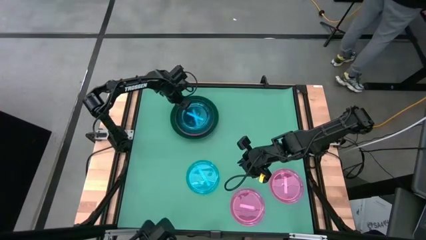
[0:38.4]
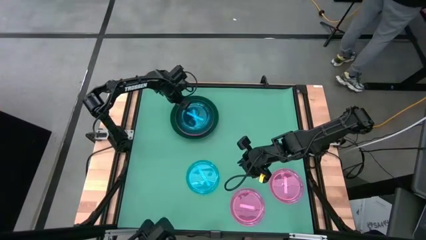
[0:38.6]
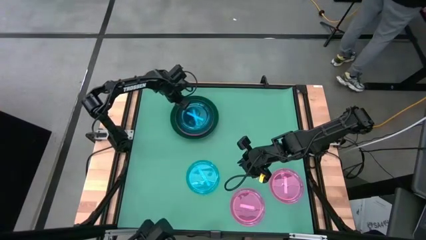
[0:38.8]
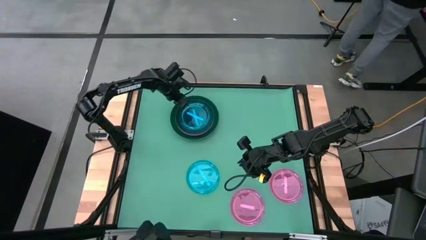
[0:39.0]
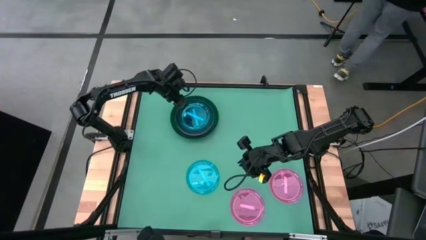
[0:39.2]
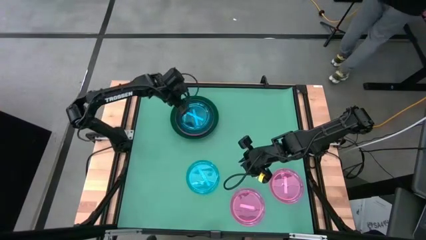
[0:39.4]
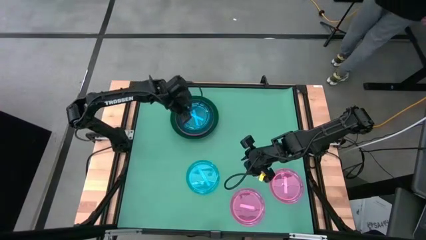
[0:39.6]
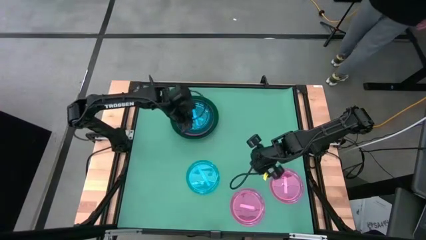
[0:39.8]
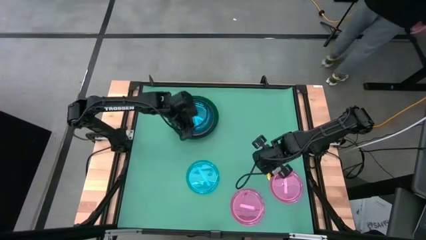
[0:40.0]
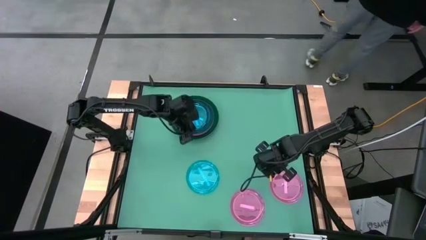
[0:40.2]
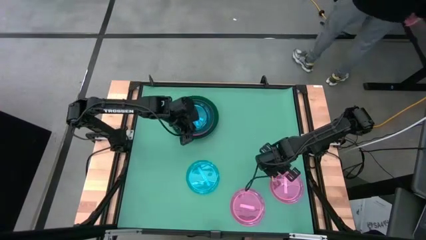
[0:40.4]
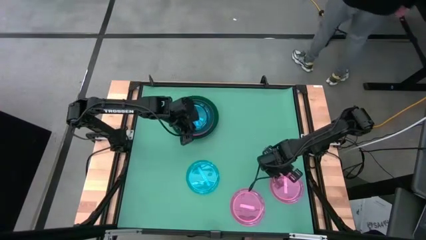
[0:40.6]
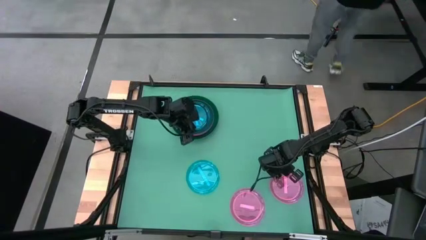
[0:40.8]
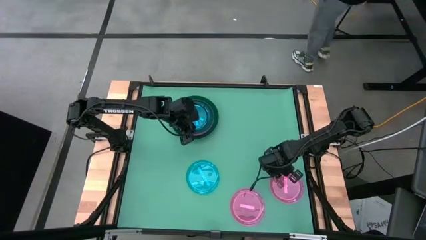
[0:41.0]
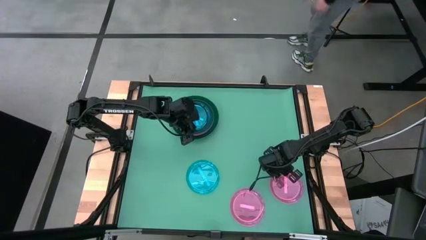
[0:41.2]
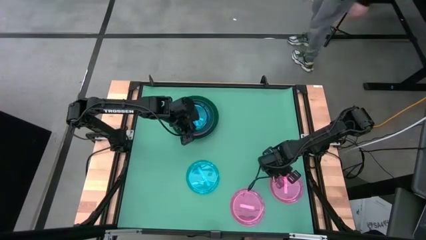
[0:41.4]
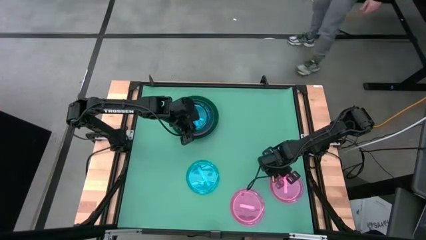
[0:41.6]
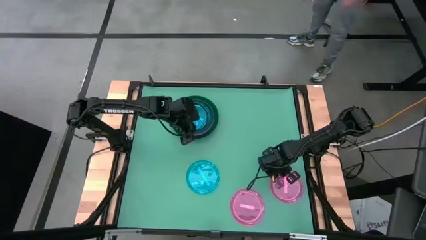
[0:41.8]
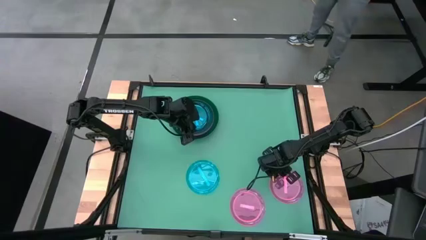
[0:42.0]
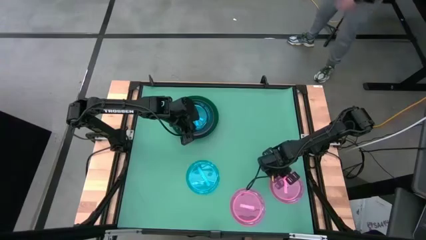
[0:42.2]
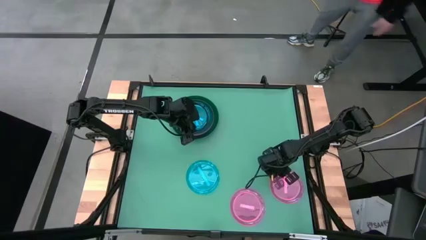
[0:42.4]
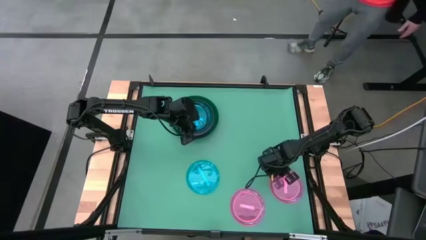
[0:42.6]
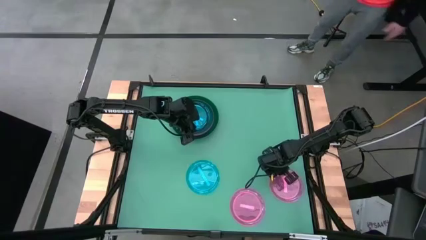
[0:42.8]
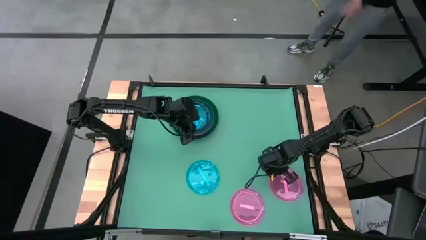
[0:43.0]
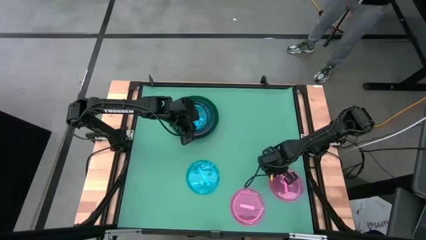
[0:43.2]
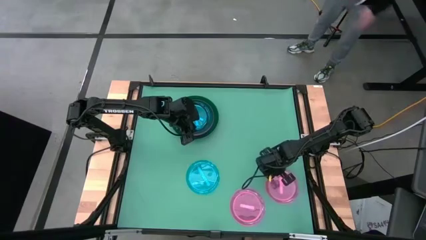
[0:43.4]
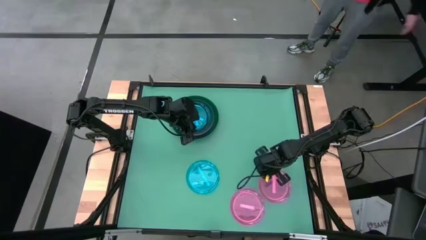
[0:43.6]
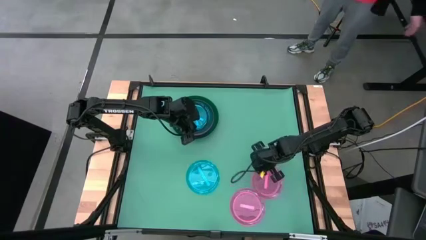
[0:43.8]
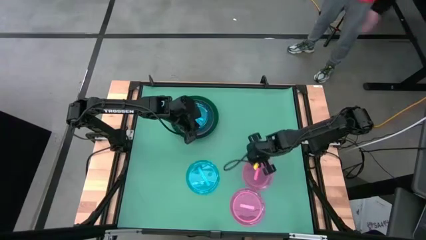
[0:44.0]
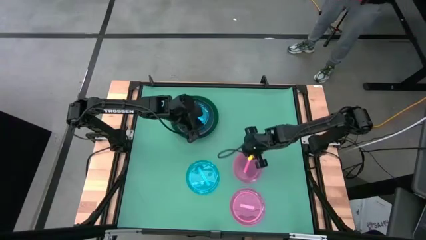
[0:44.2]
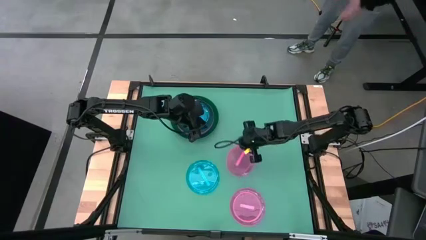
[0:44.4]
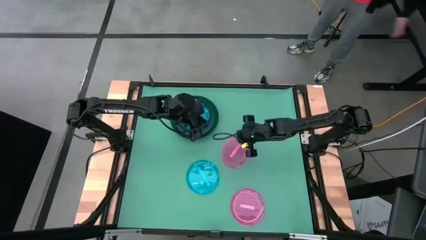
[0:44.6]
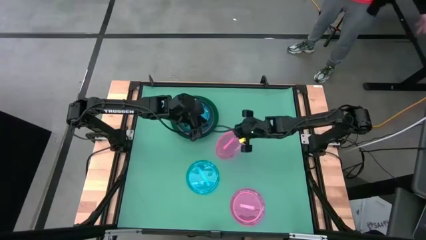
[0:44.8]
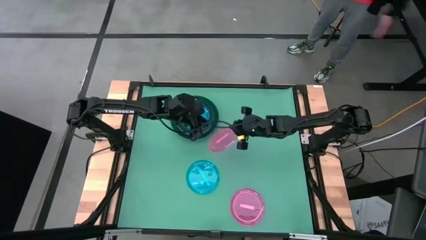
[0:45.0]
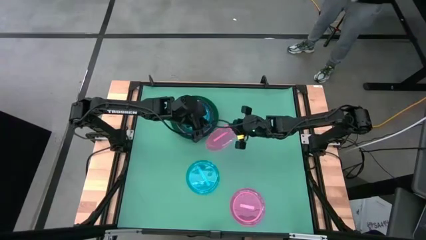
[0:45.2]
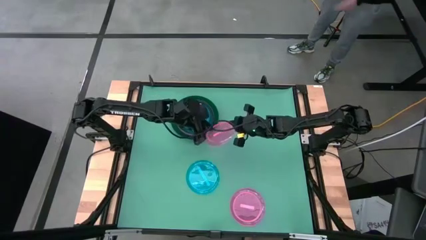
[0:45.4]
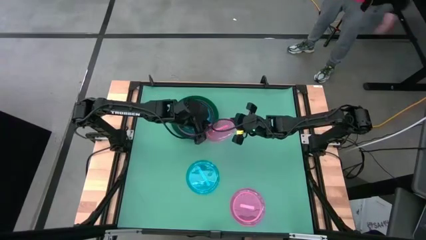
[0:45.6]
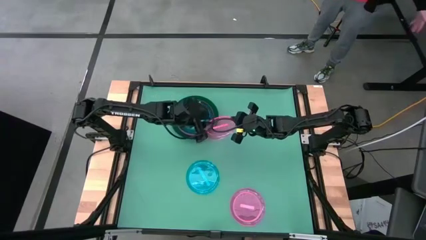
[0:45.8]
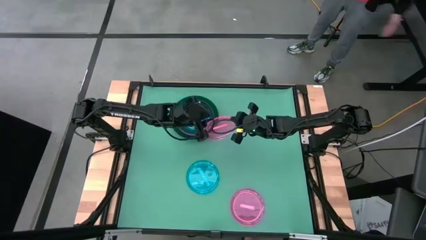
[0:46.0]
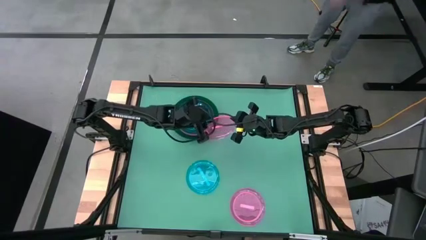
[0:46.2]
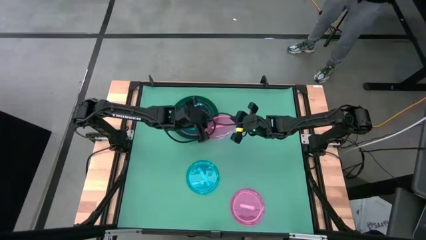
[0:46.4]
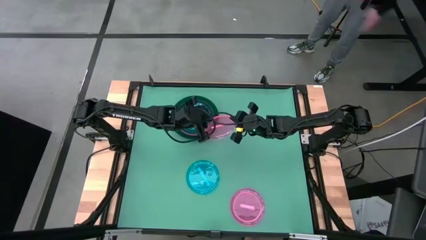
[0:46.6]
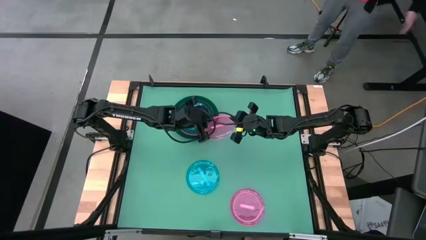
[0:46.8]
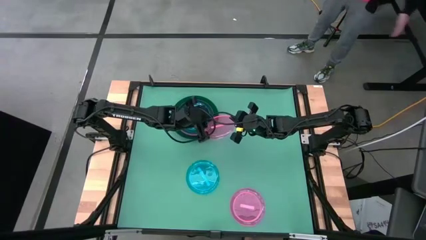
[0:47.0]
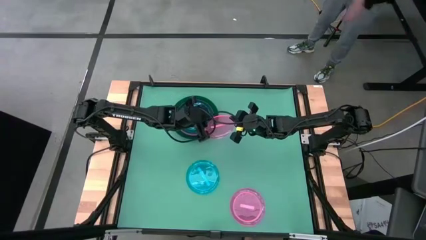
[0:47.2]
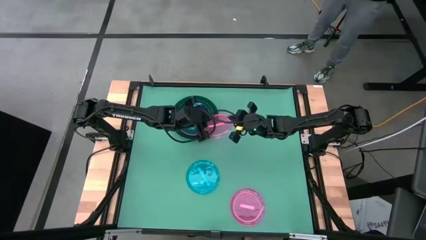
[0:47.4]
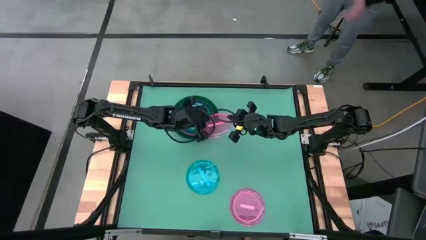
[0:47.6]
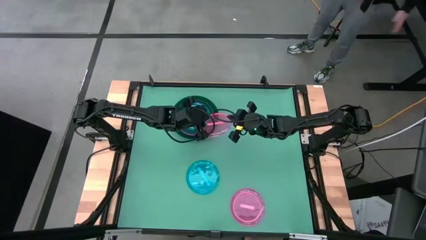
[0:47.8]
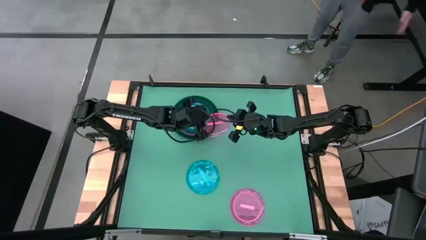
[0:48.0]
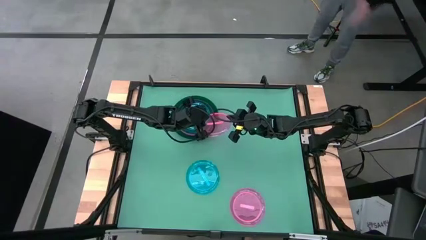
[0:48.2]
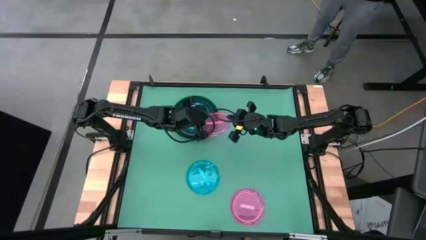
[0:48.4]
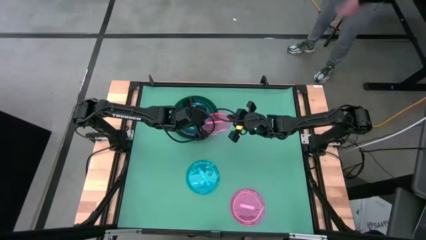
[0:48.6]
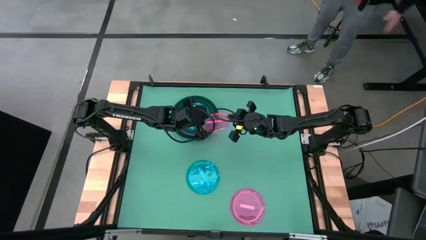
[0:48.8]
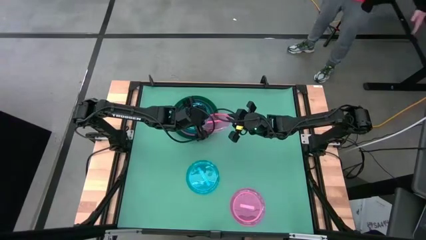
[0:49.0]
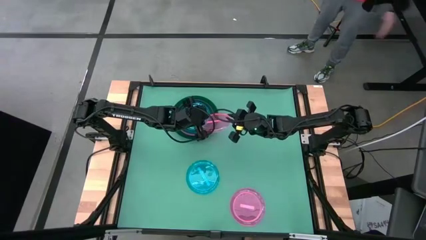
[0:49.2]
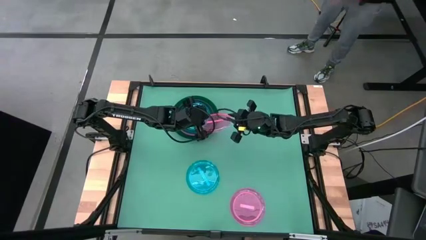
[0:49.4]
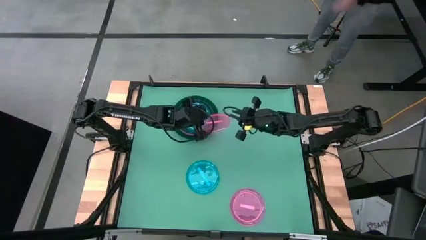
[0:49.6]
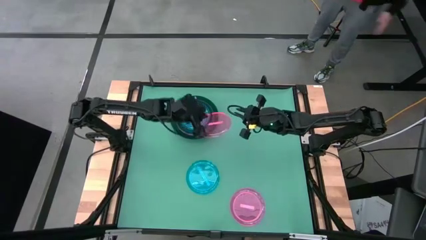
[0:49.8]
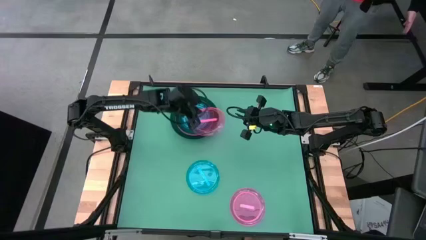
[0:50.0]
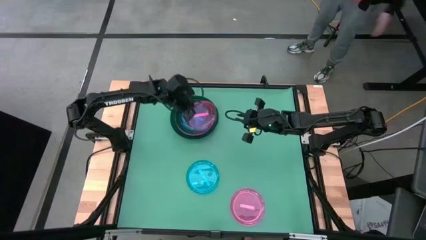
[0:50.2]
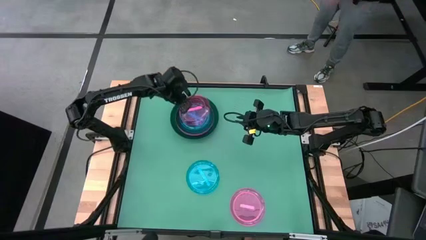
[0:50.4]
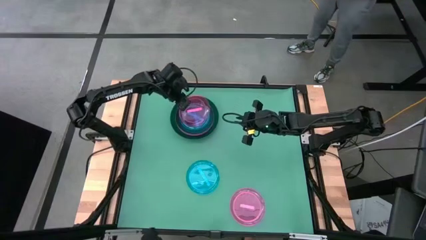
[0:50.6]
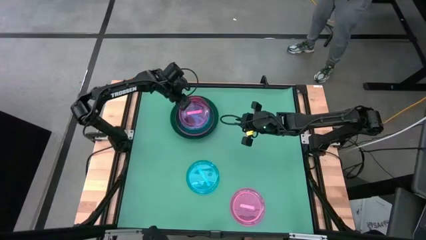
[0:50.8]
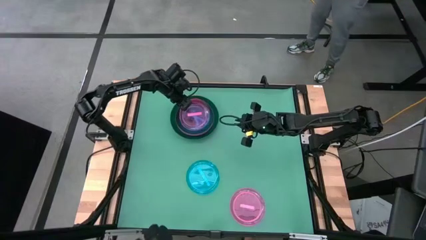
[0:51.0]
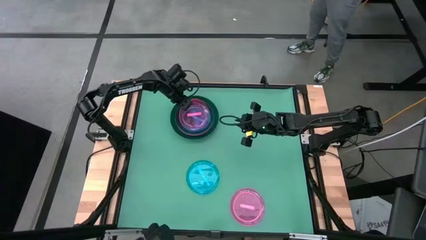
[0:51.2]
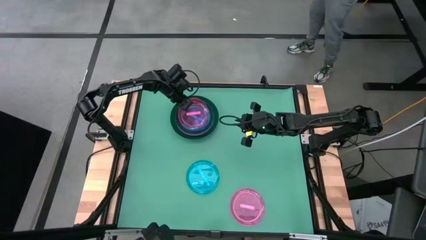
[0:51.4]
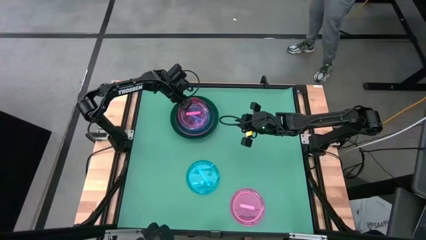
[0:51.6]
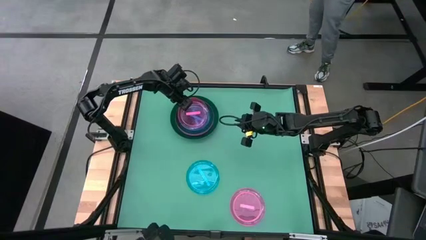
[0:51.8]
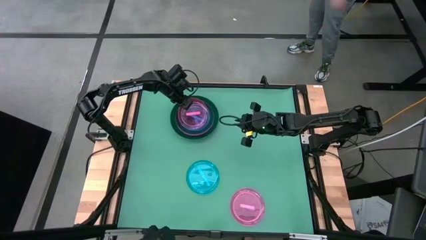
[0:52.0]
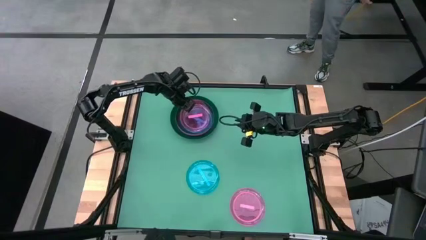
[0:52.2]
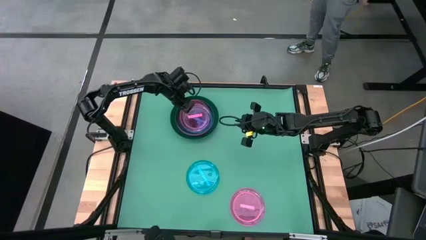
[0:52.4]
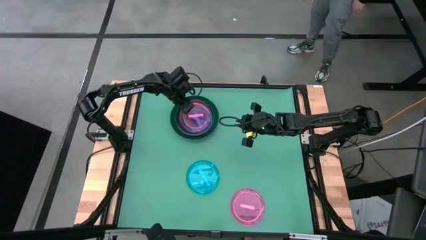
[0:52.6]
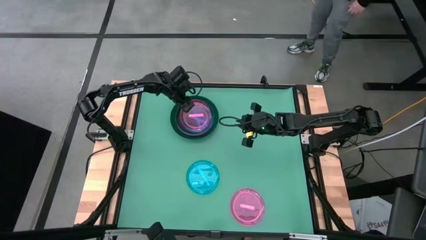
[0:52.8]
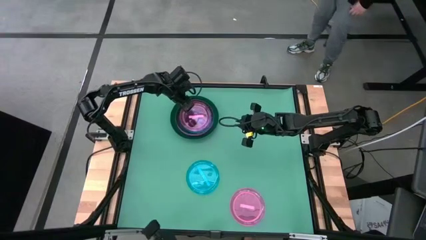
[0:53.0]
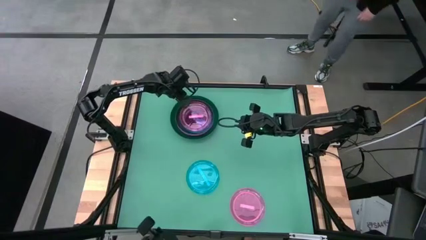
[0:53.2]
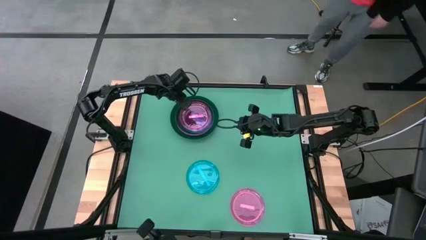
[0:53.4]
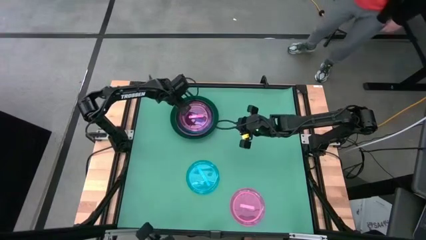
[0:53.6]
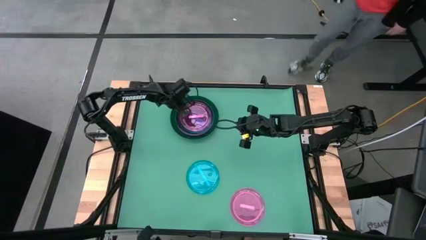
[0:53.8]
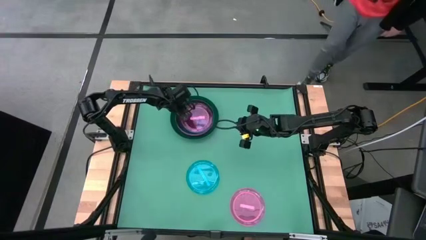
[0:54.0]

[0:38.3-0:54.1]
Task: Stack plastic plates
Stack the right light pink plate on top of the blue plate
